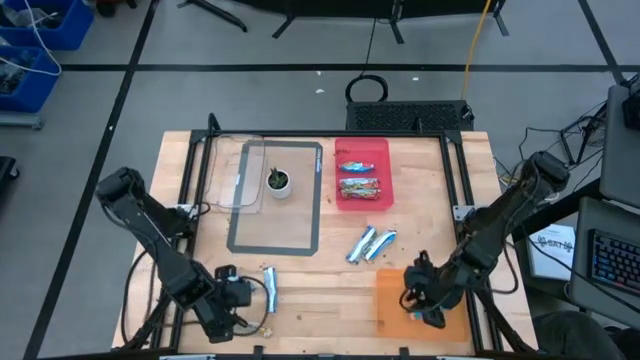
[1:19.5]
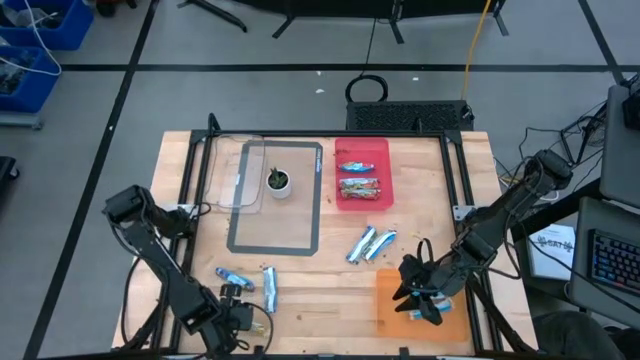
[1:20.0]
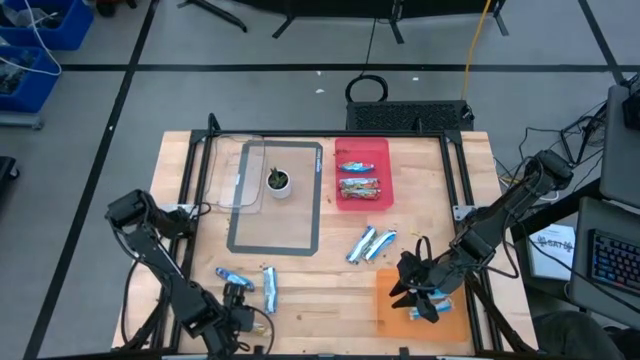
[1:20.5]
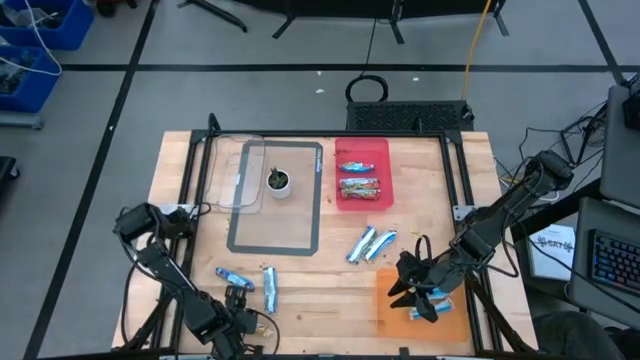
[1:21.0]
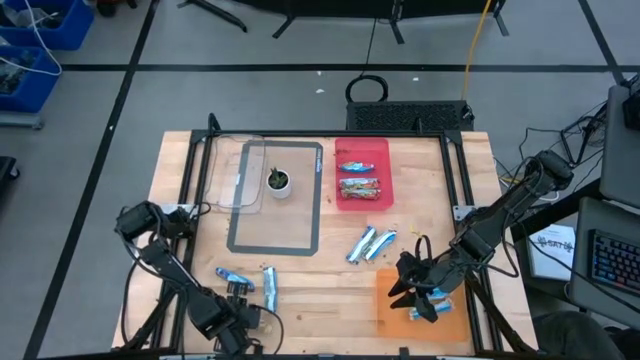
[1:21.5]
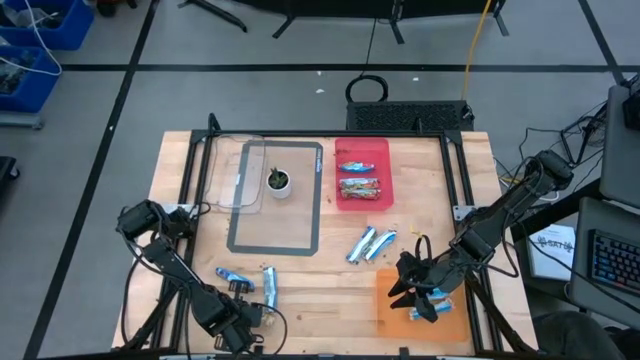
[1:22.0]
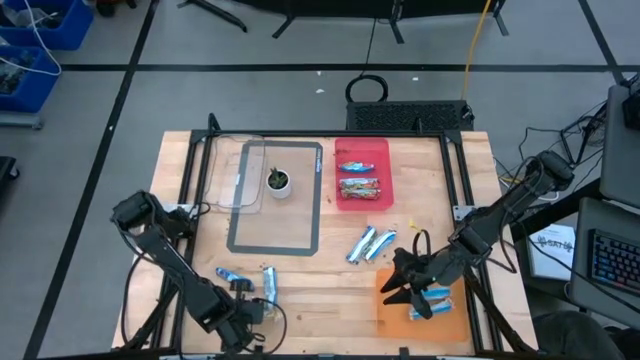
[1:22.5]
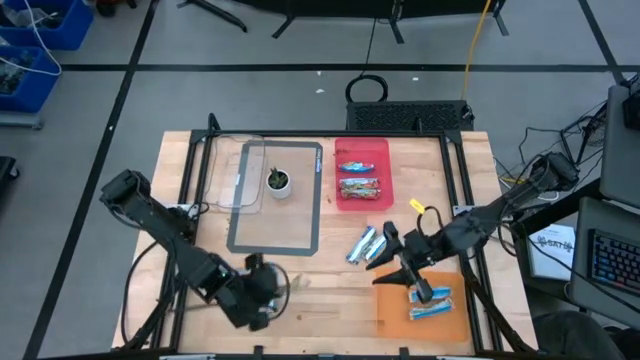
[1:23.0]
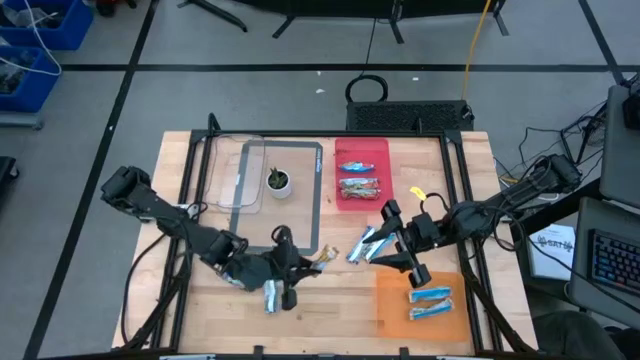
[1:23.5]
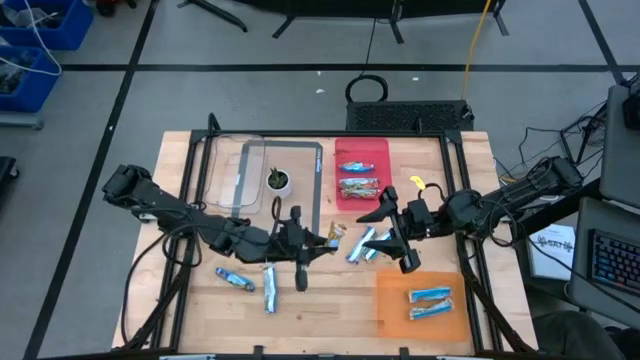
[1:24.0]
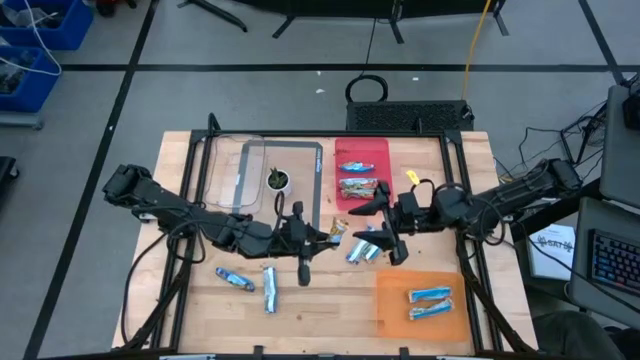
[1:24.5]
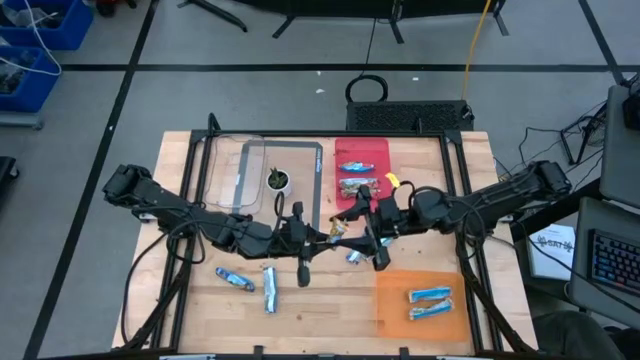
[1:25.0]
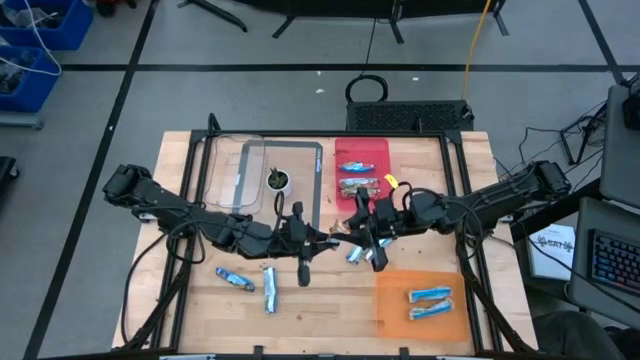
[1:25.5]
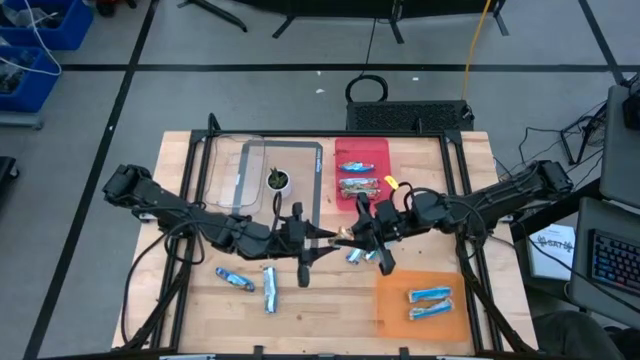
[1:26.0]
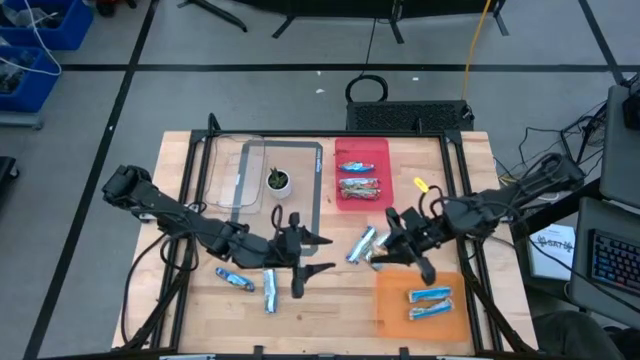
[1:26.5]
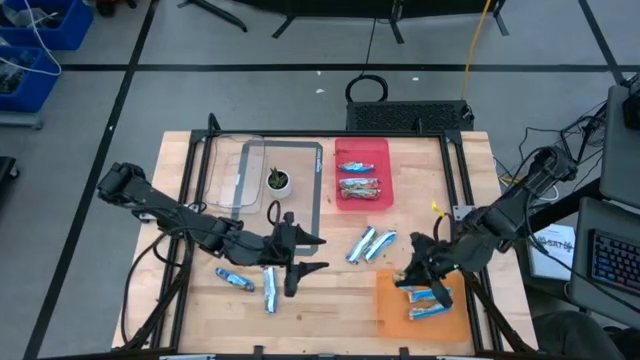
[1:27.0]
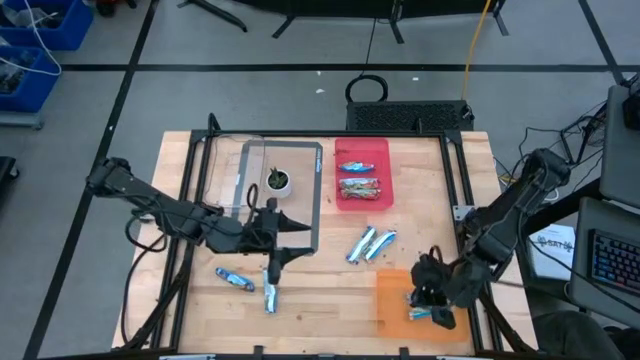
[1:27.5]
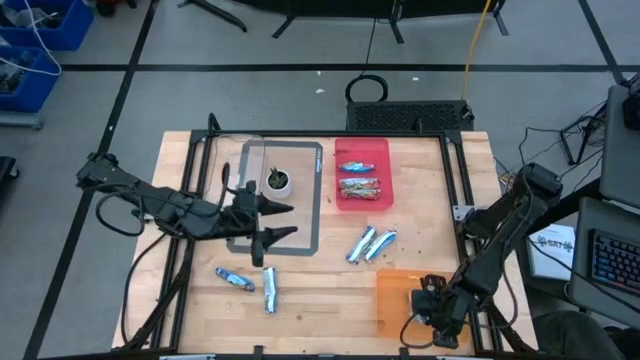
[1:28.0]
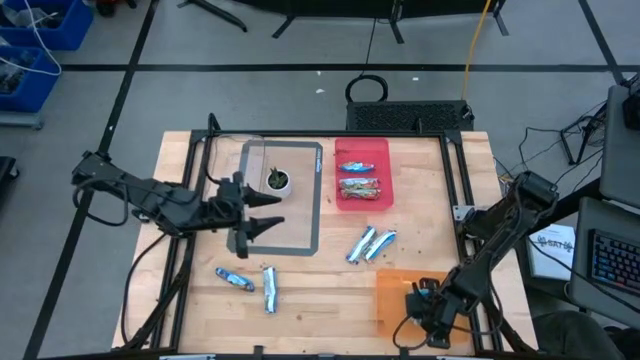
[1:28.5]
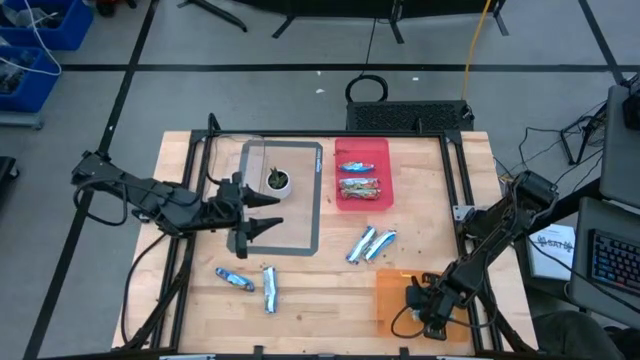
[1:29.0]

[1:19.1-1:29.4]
Task: Pick and place Granola Bars by type
Put the orange granola bar into the orange bin

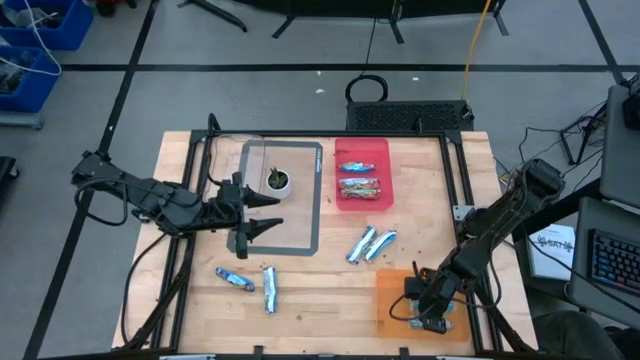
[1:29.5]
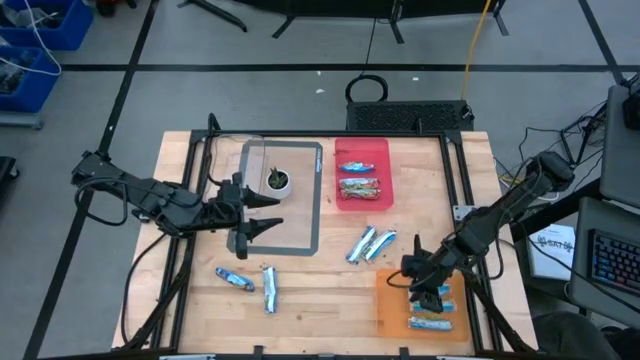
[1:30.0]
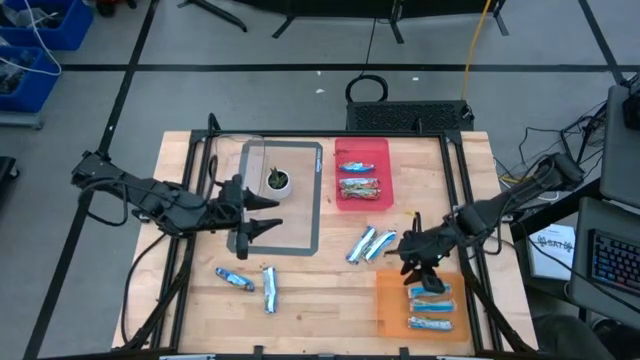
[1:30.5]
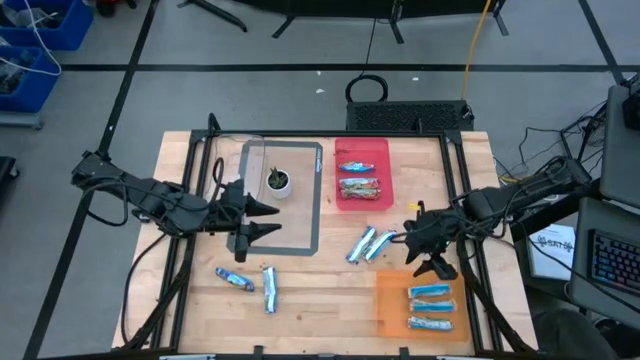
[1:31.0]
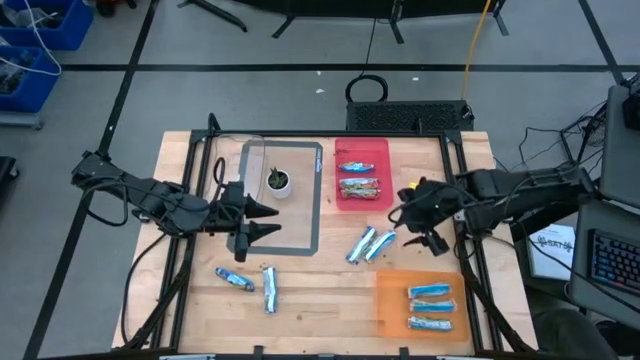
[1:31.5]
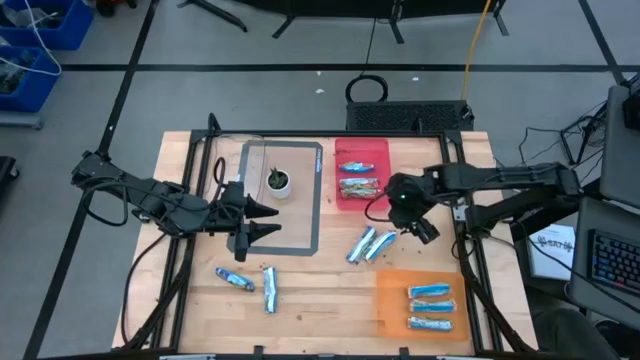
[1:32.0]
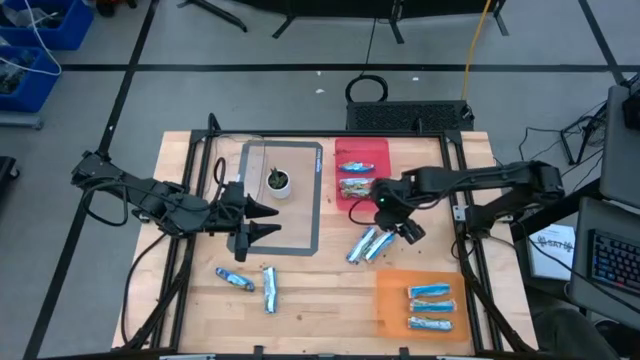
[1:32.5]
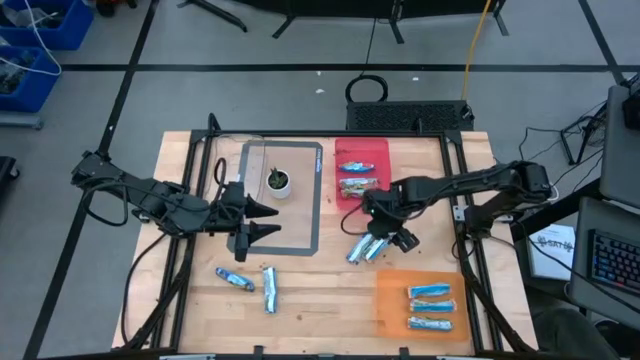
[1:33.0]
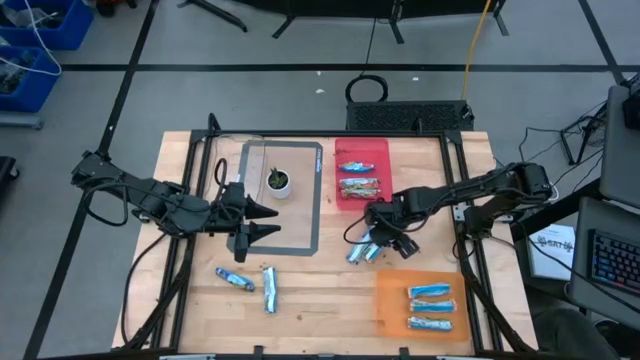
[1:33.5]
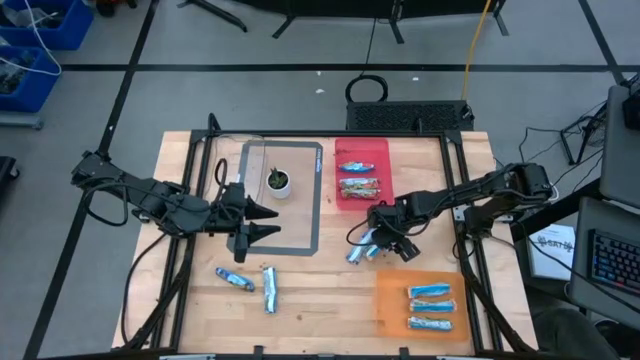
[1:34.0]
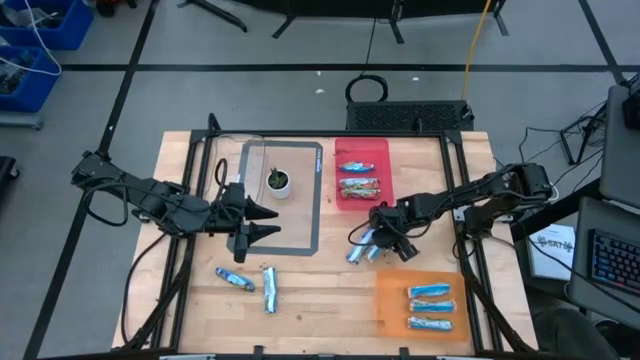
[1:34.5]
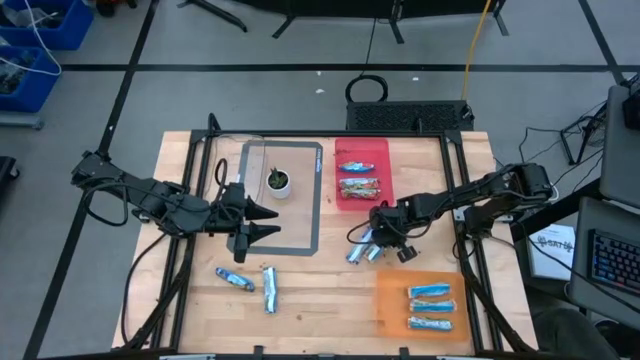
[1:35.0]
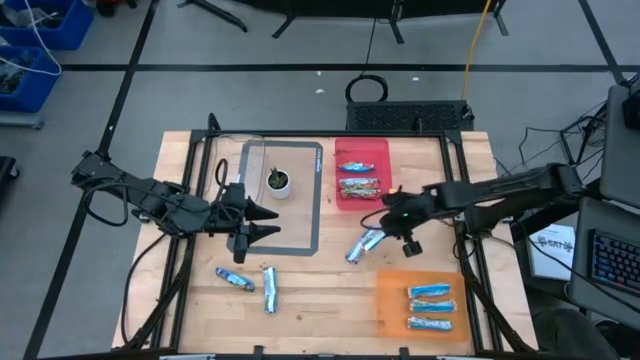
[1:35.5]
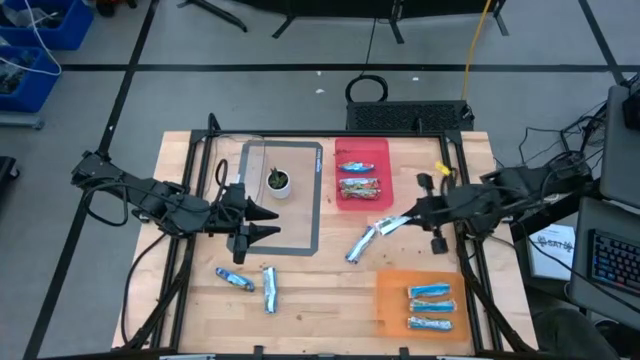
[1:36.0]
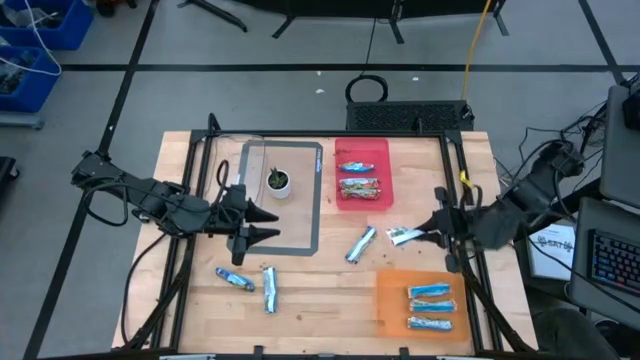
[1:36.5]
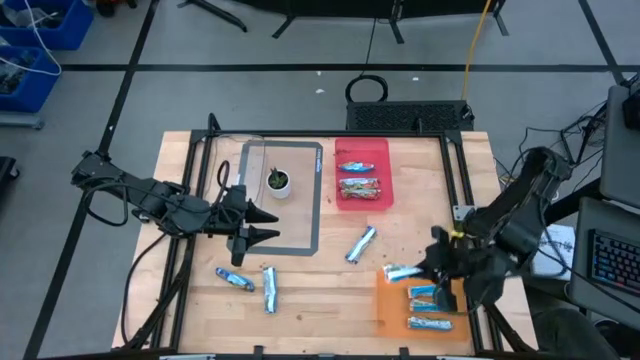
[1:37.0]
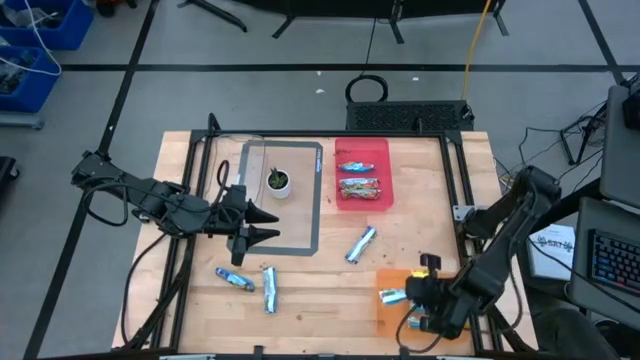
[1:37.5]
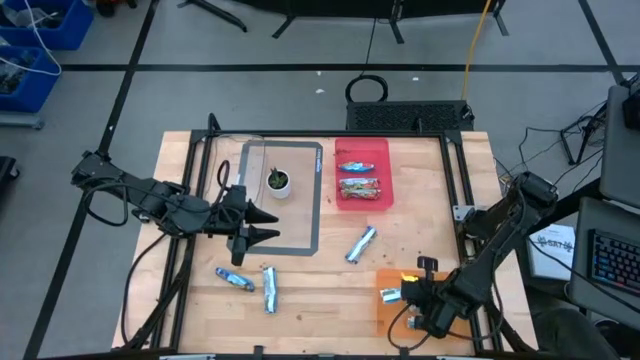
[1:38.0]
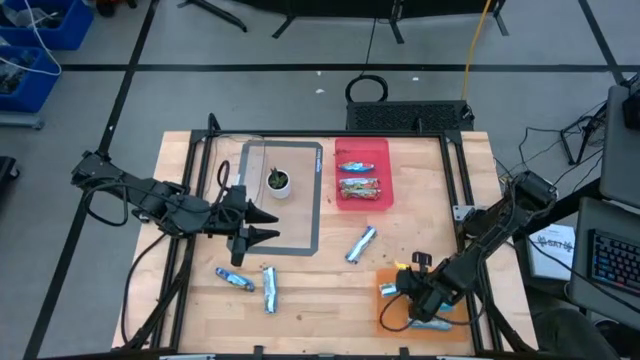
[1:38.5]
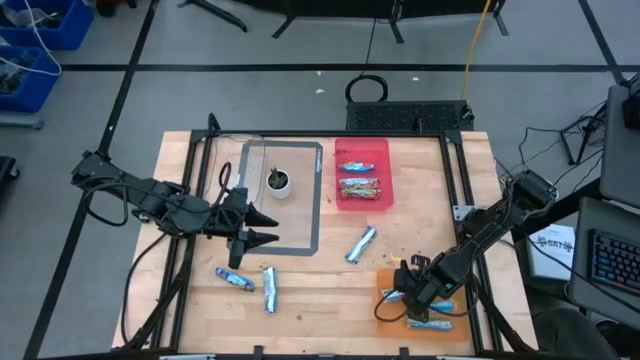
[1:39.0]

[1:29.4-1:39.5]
Put the orange granola bar into the orange bin

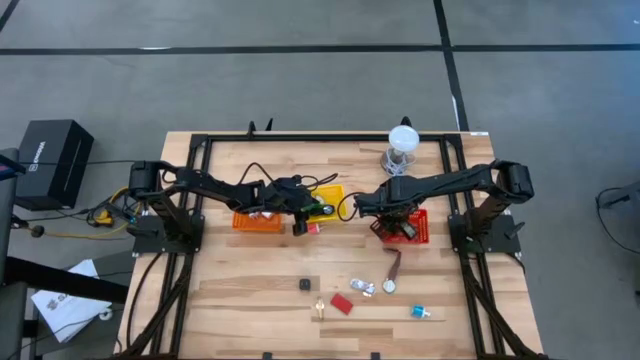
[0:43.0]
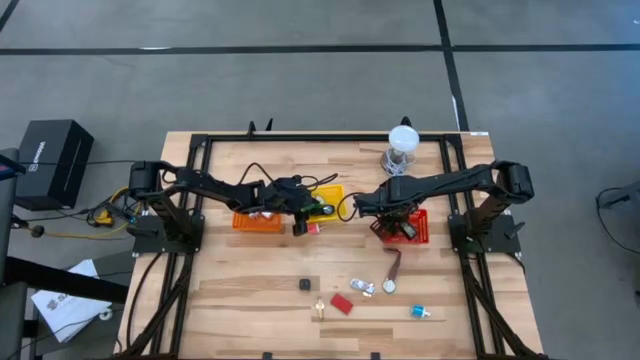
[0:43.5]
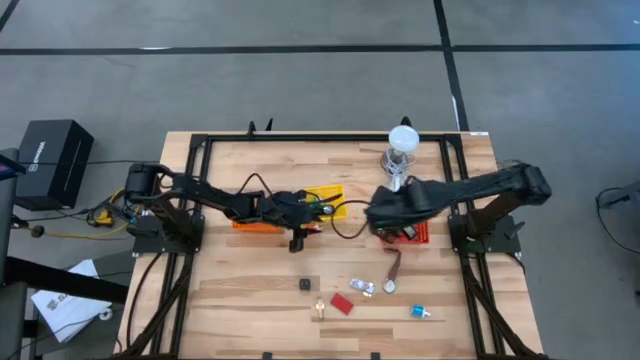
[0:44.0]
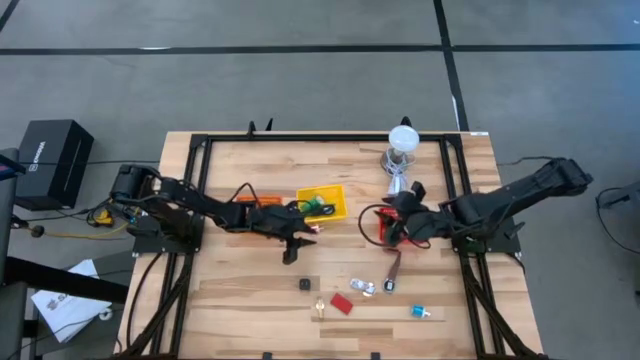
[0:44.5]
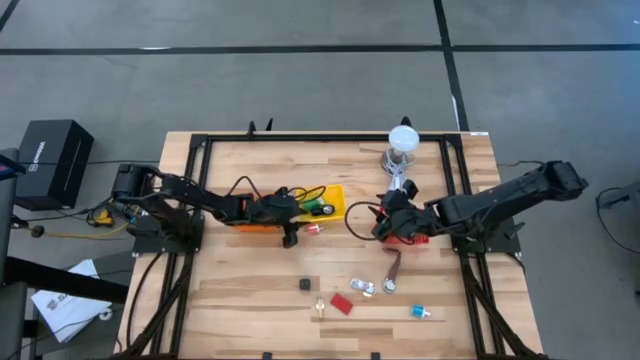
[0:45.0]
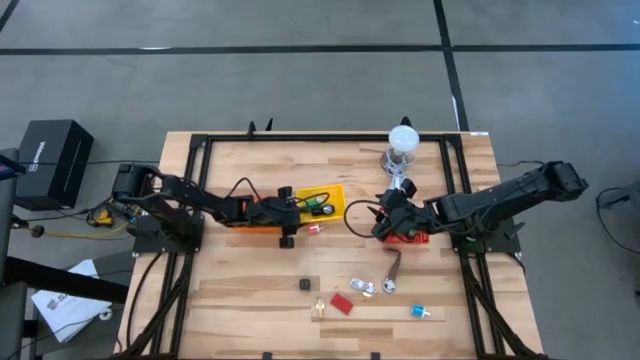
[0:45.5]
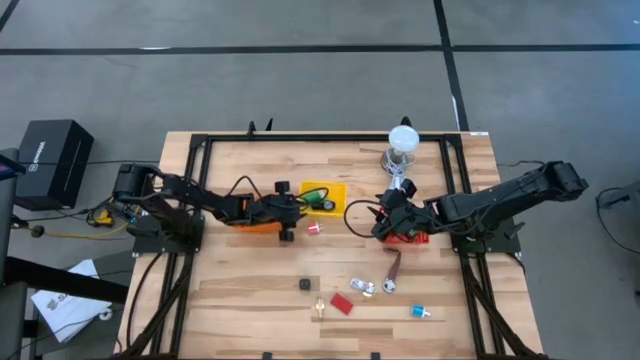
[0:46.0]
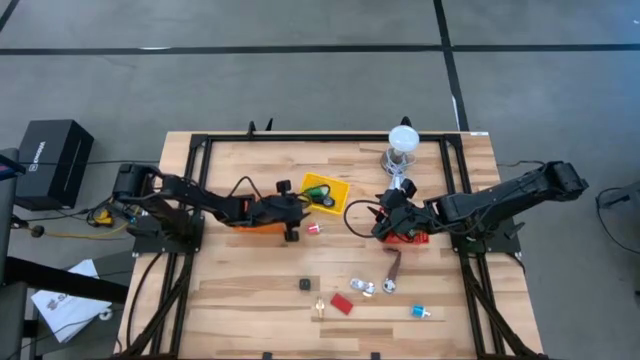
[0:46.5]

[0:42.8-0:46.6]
Task: Pick & Place Office items
Adjust the yellow bin
